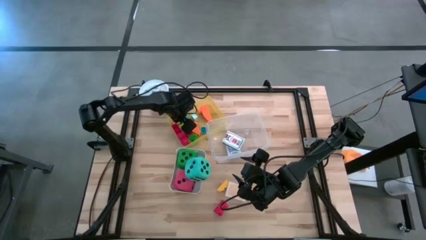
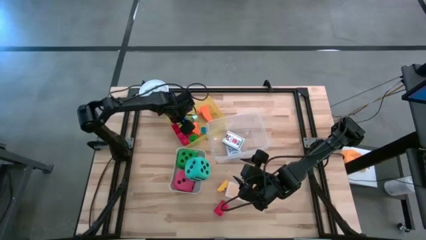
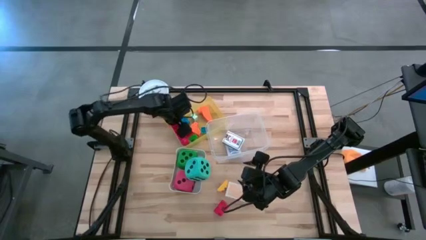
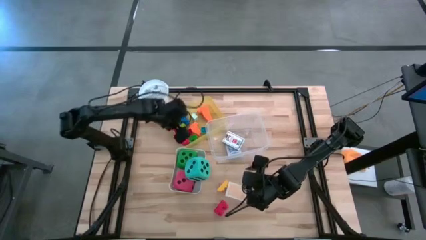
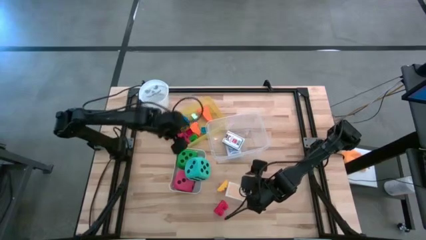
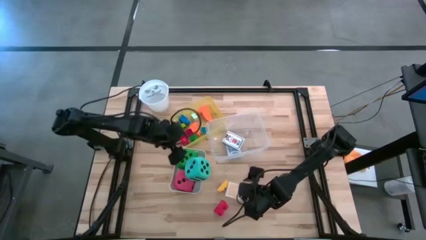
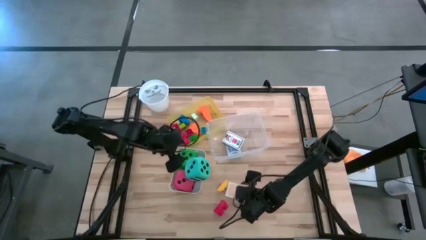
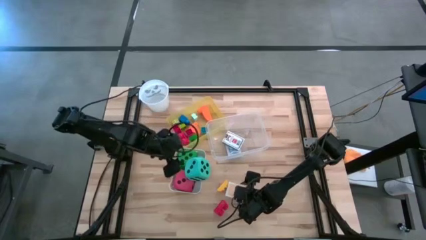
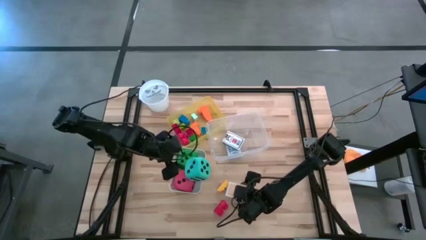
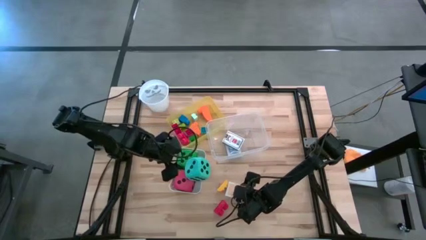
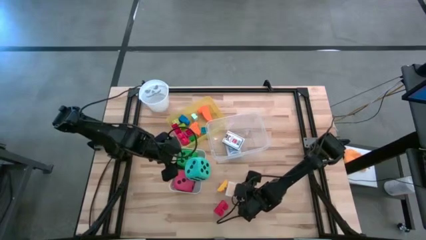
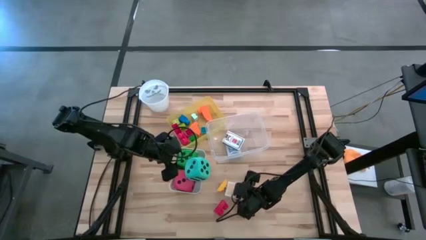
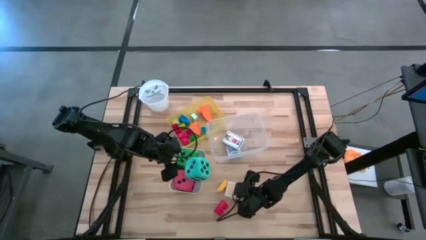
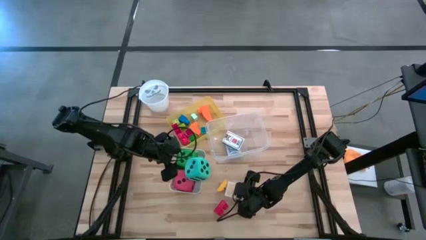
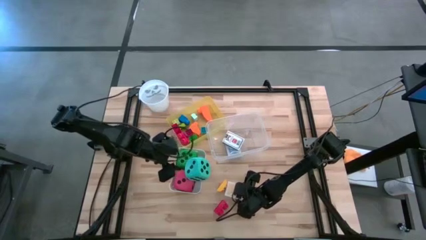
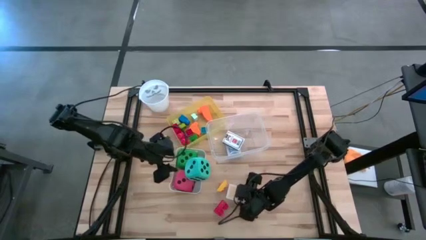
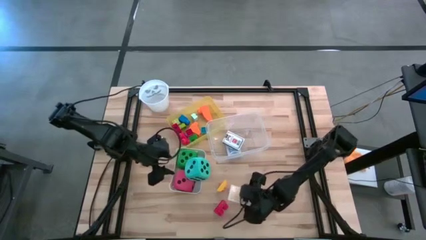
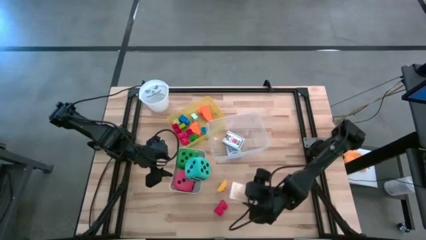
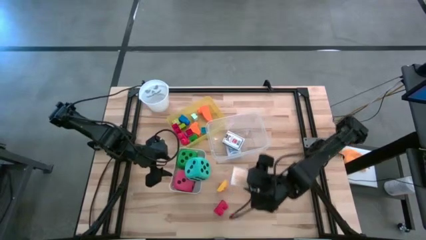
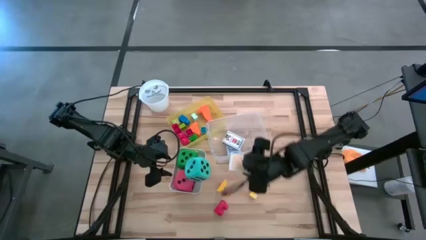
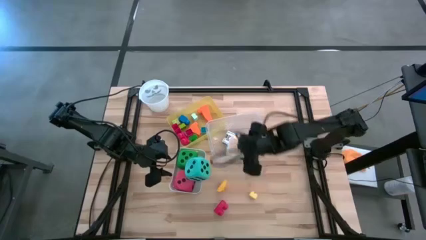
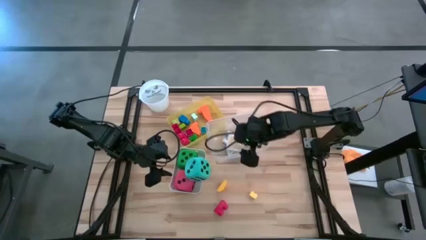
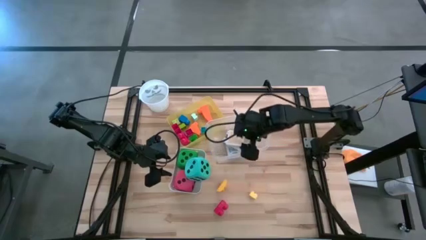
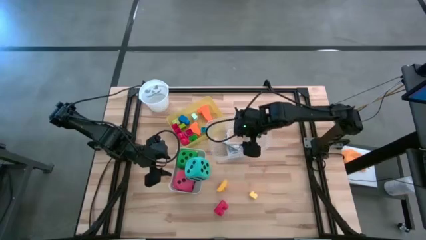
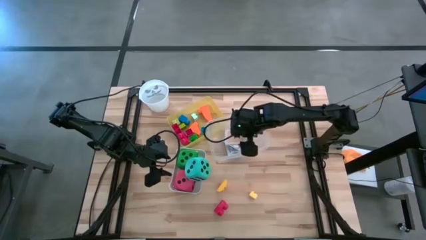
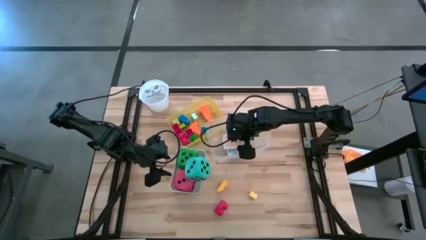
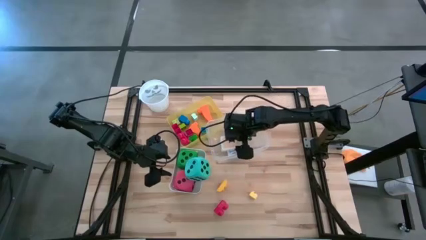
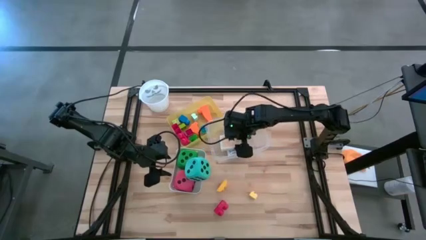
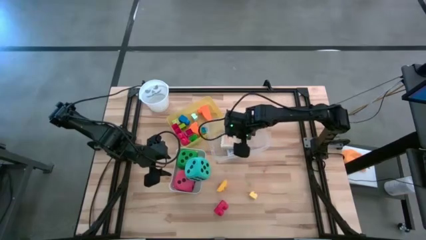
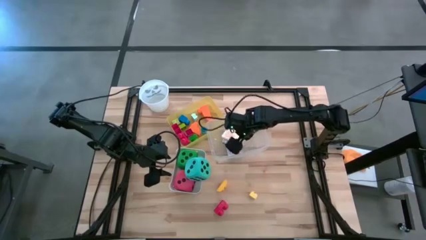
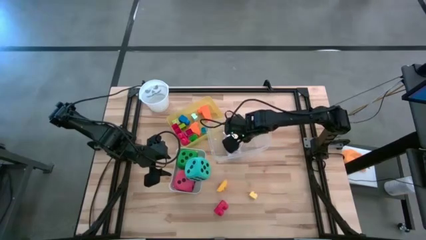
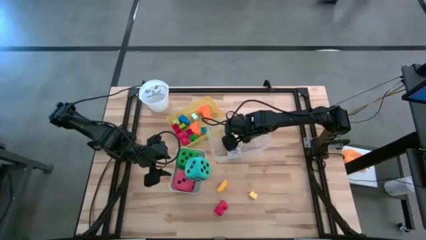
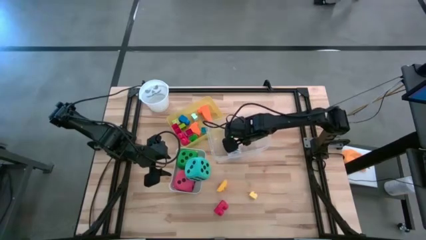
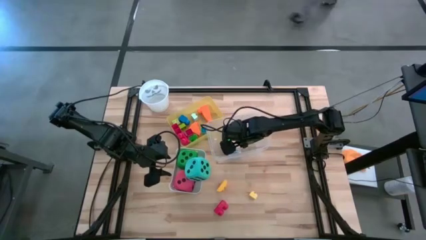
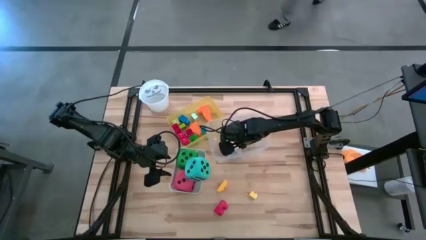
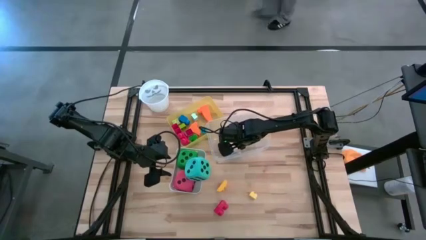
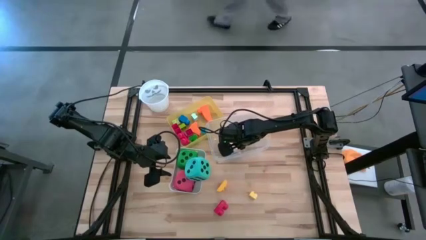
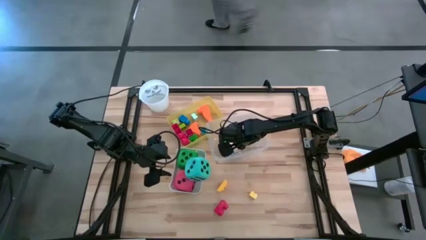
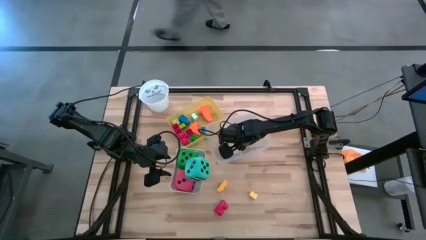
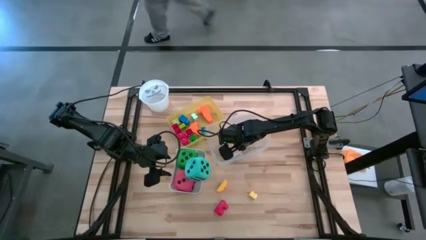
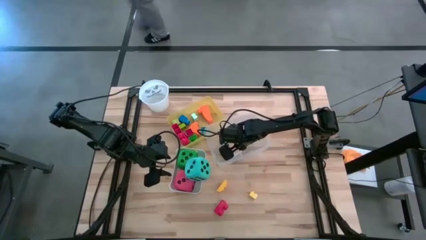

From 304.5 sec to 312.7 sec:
Task: Pick & Place Toys
Put the yellow game card pack into the transparent bin

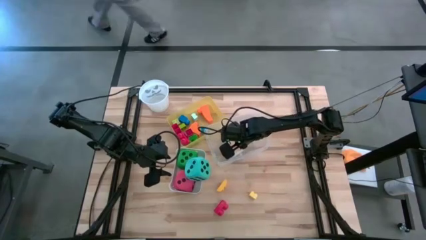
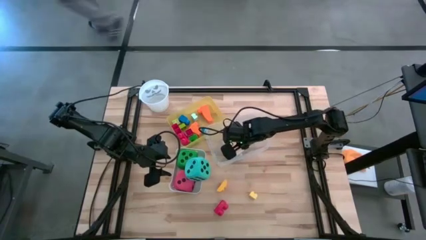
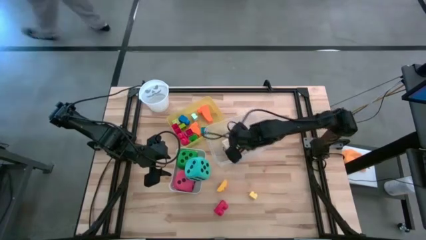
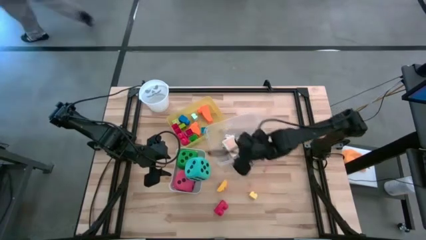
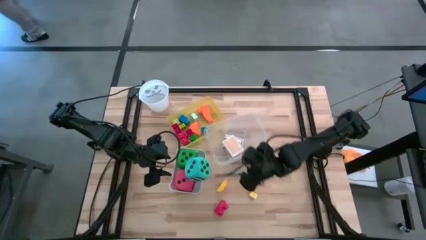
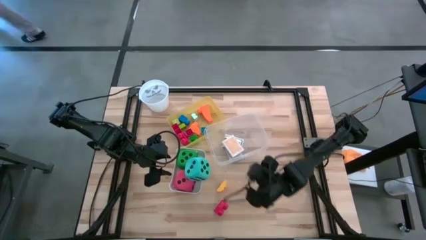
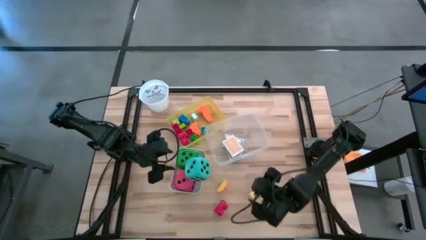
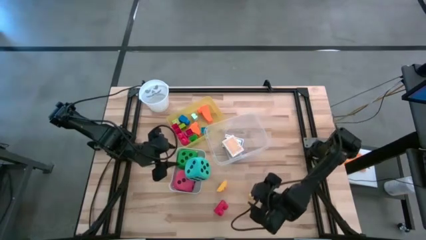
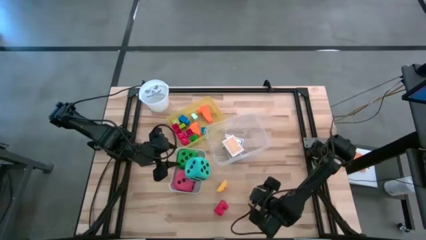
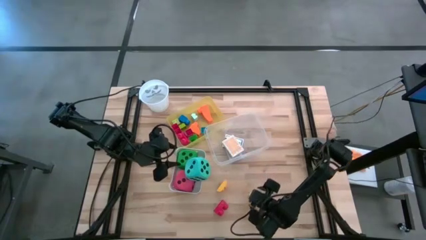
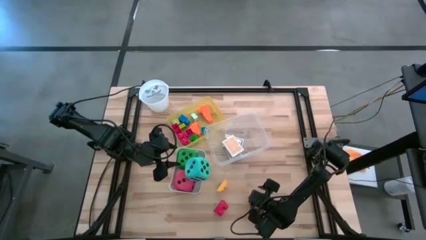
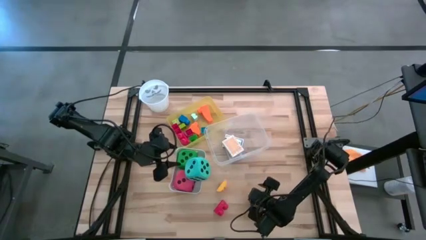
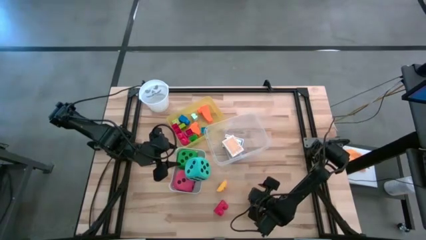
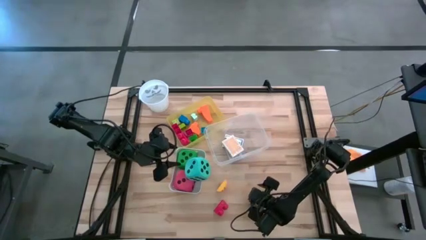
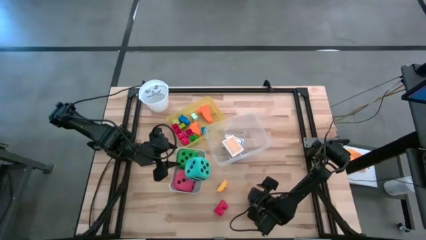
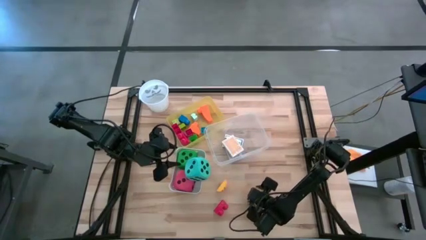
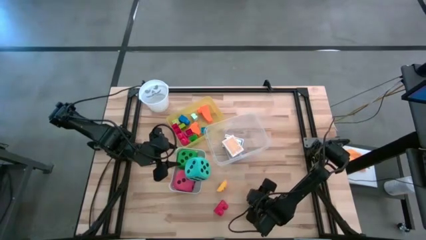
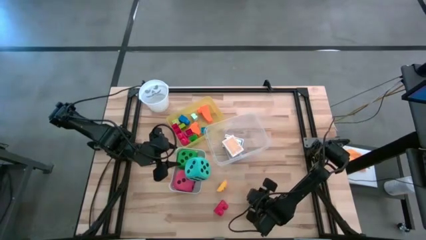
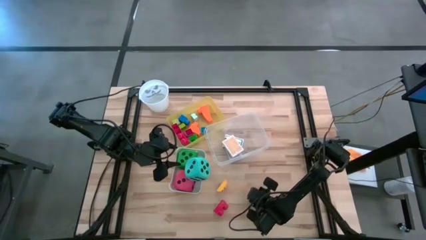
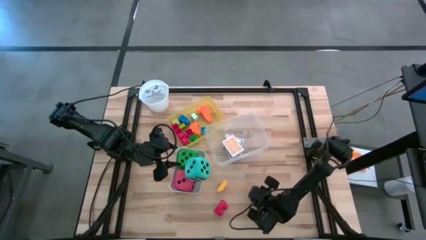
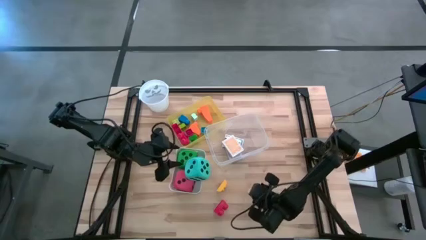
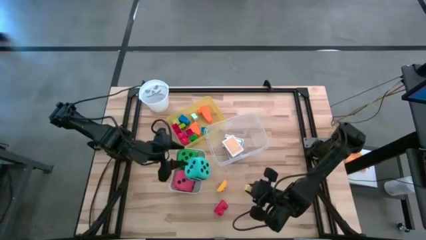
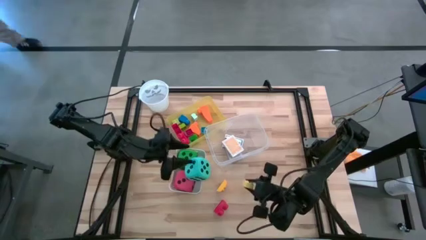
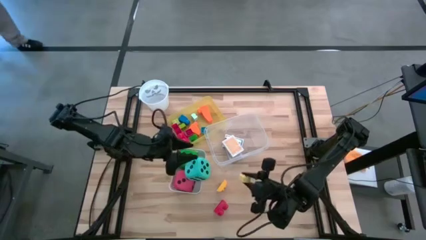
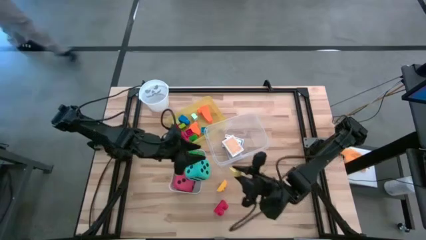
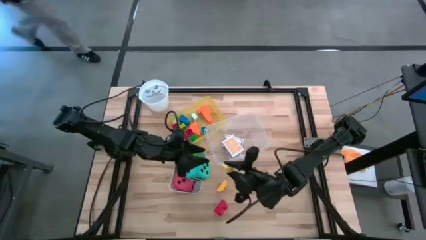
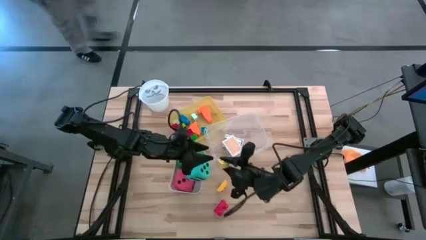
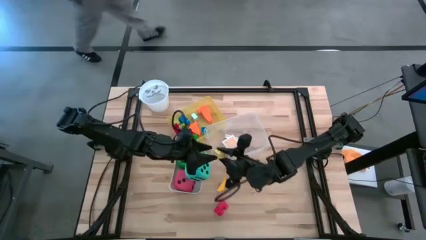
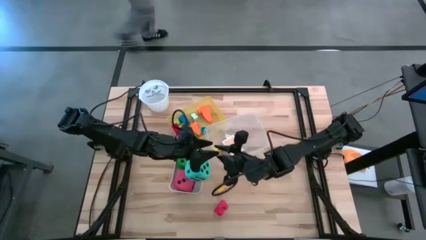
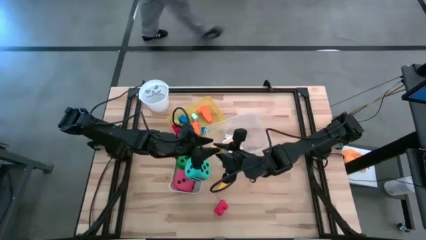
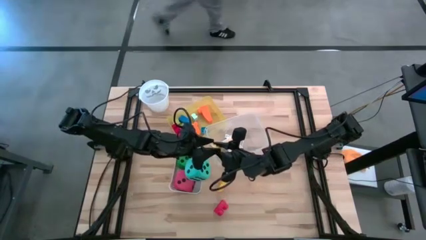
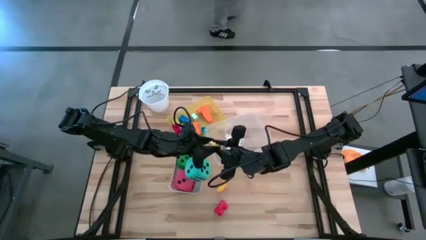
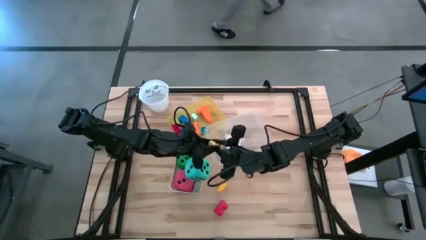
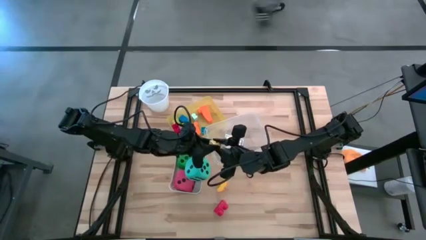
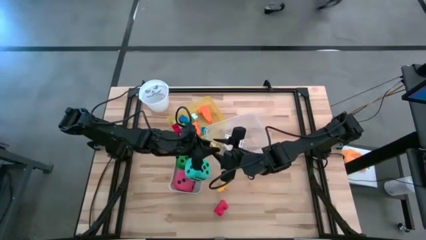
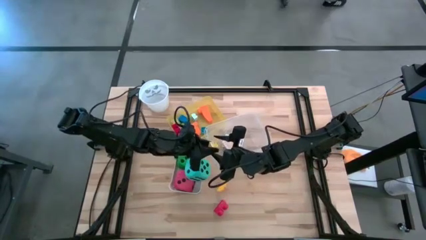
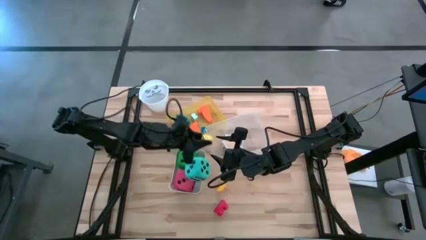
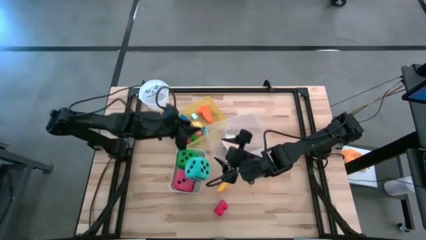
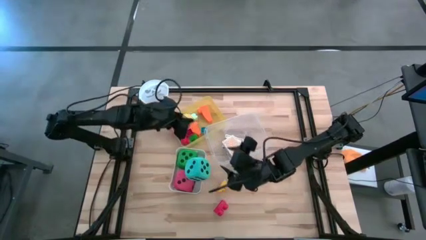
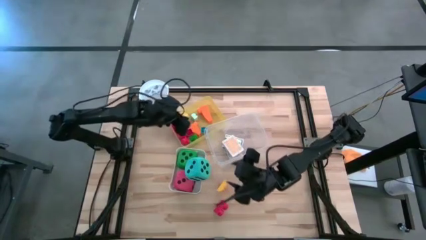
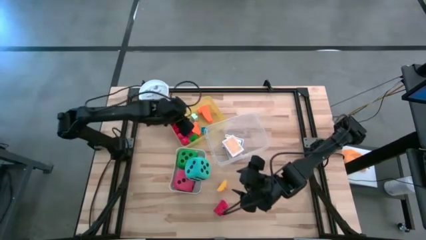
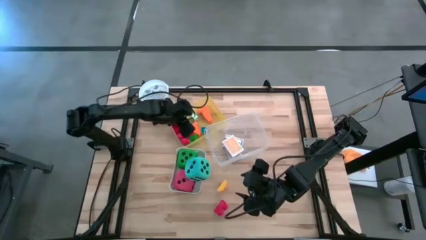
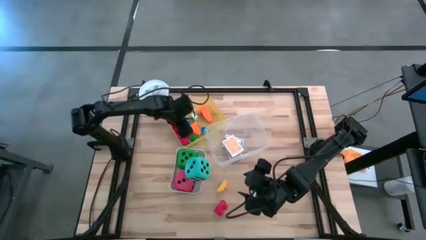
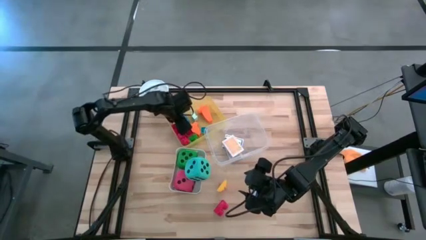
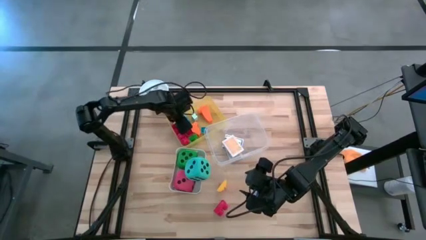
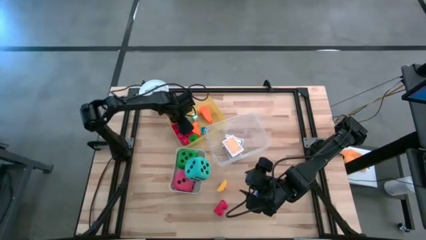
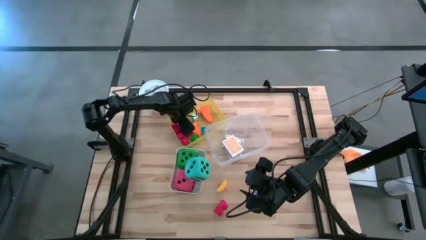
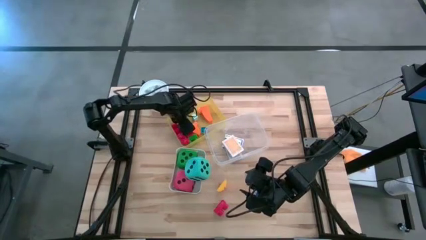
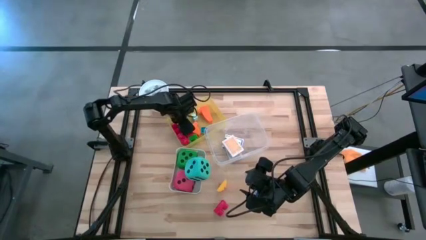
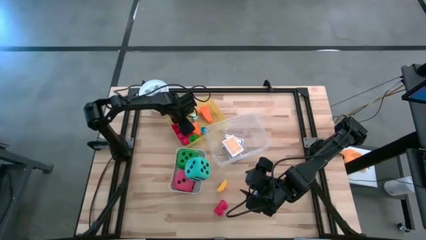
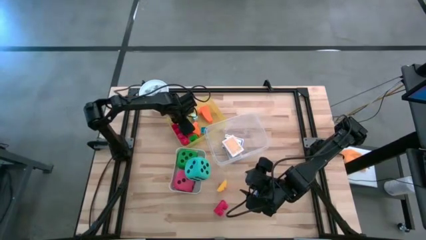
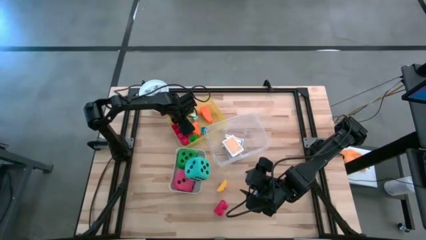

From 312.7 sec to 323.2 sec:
Put the yellow game piece into the yellow bin
